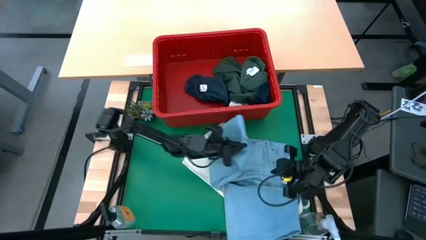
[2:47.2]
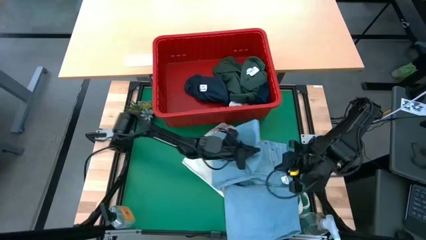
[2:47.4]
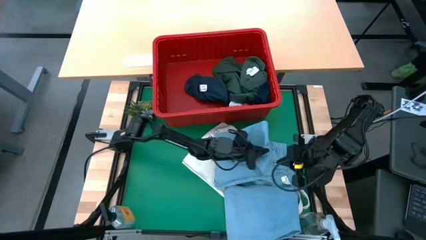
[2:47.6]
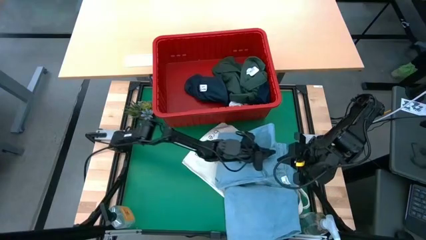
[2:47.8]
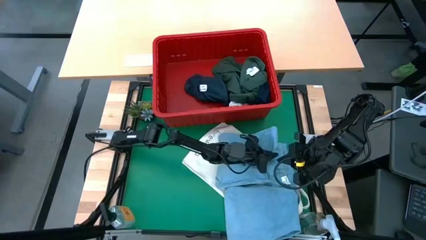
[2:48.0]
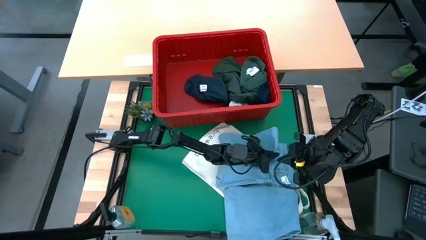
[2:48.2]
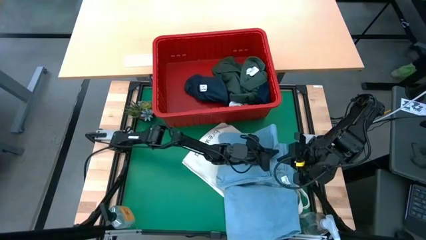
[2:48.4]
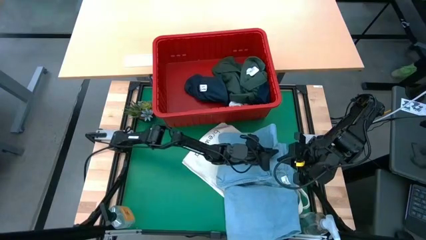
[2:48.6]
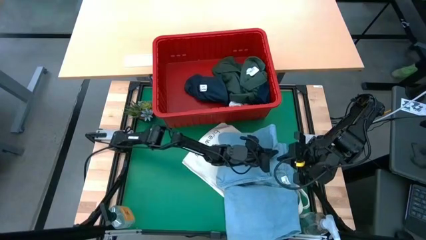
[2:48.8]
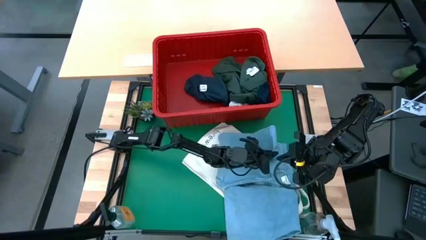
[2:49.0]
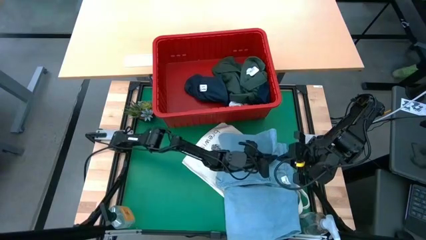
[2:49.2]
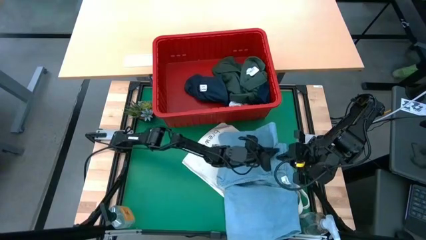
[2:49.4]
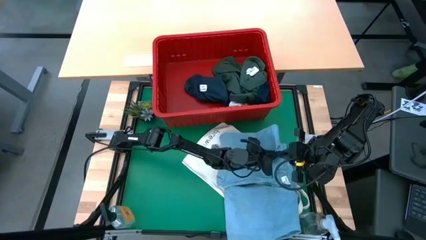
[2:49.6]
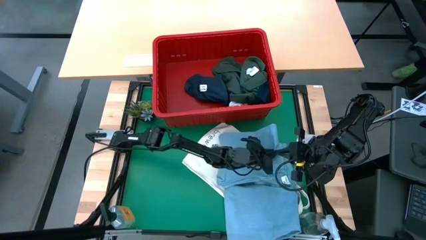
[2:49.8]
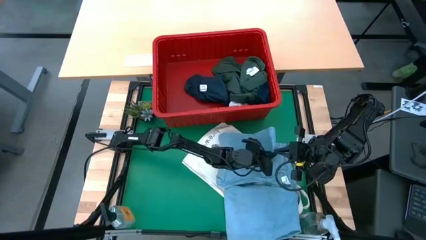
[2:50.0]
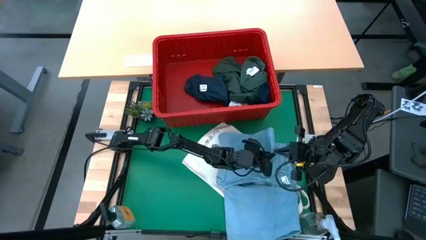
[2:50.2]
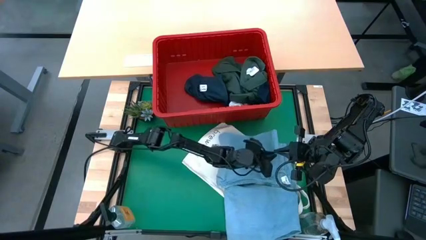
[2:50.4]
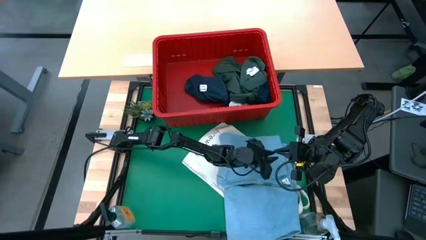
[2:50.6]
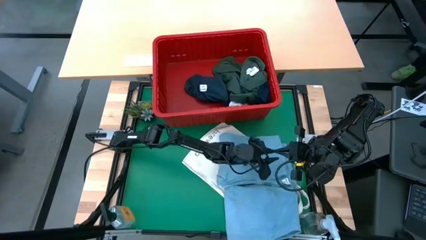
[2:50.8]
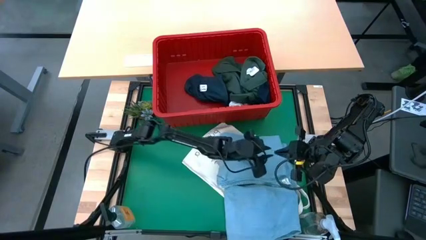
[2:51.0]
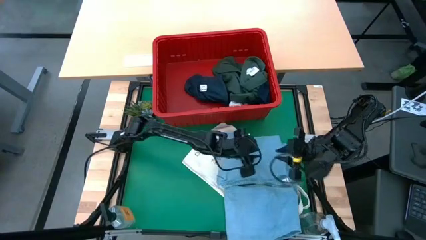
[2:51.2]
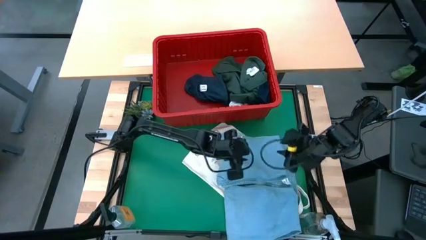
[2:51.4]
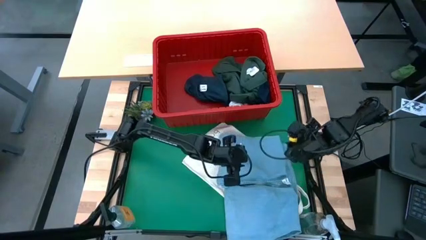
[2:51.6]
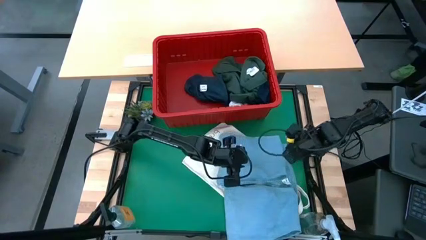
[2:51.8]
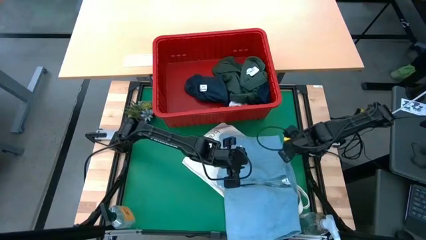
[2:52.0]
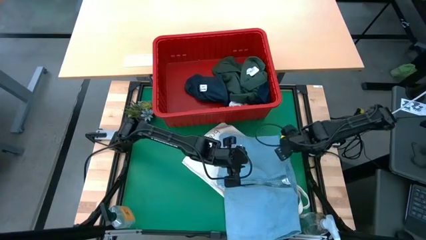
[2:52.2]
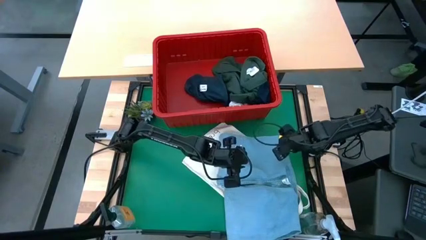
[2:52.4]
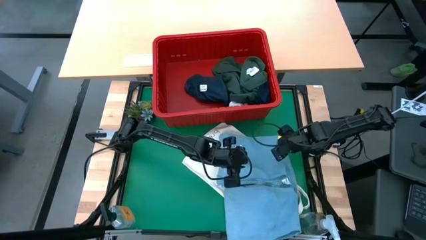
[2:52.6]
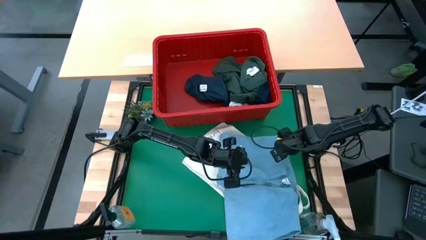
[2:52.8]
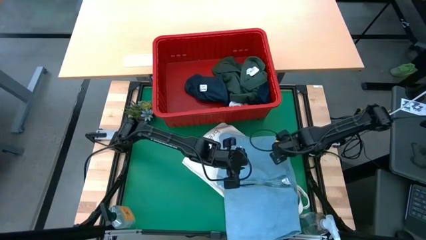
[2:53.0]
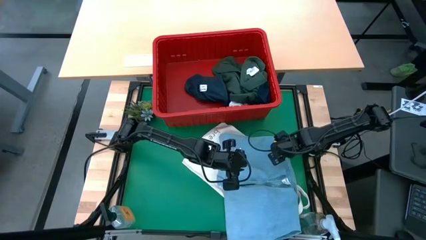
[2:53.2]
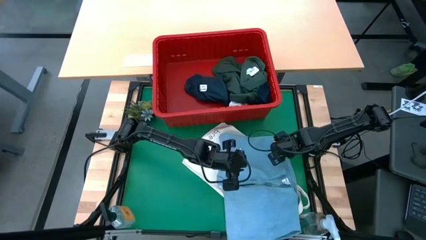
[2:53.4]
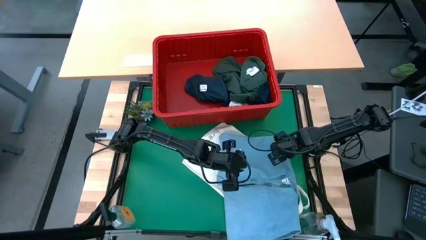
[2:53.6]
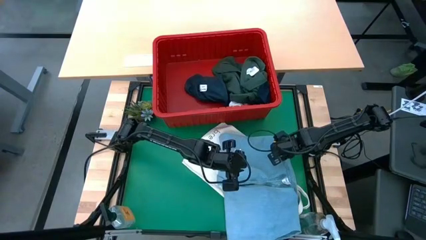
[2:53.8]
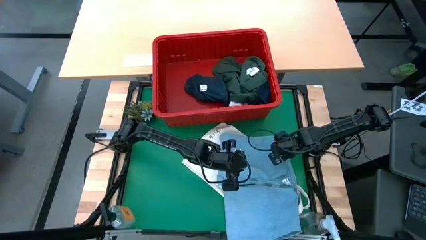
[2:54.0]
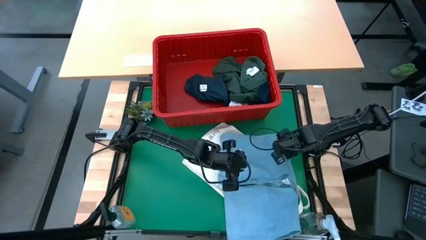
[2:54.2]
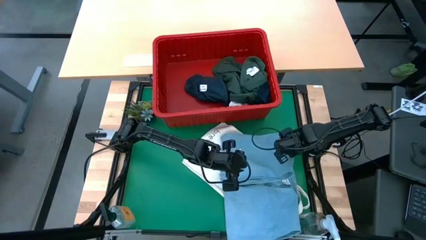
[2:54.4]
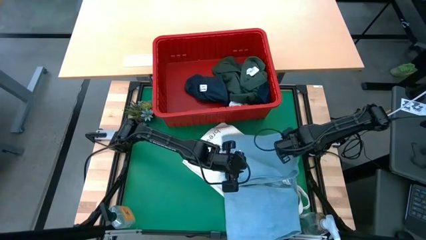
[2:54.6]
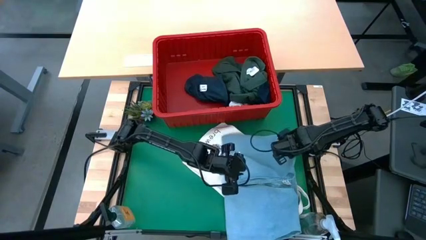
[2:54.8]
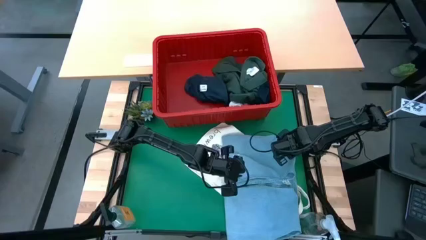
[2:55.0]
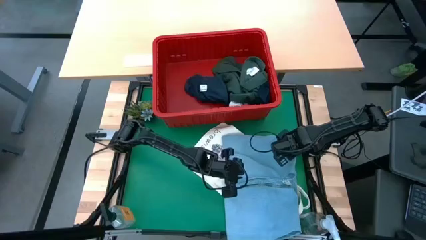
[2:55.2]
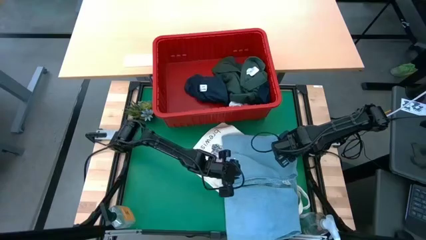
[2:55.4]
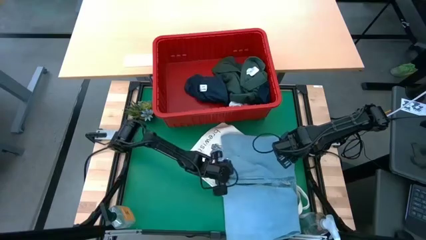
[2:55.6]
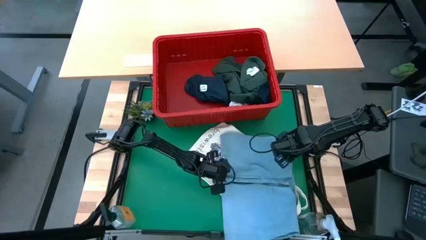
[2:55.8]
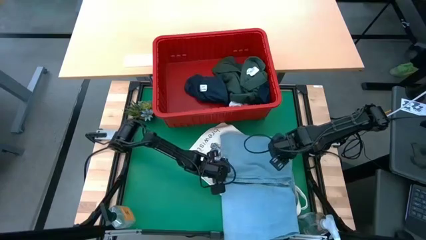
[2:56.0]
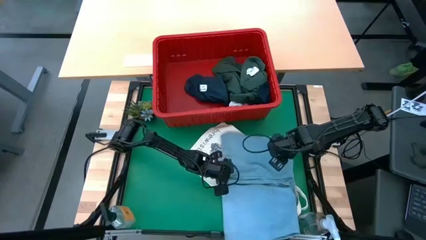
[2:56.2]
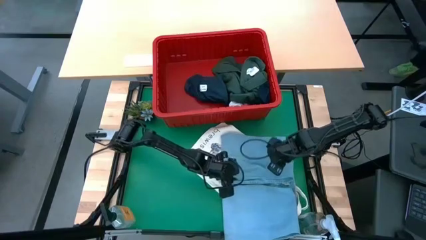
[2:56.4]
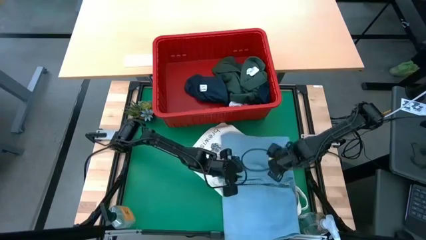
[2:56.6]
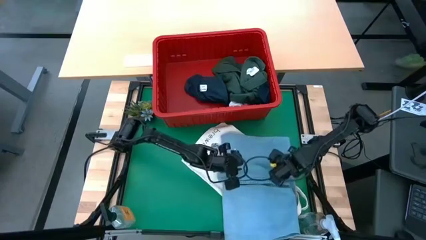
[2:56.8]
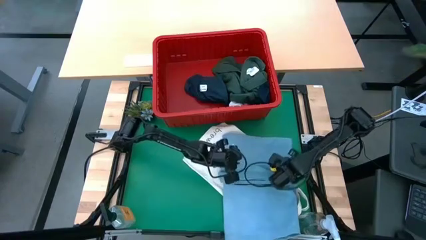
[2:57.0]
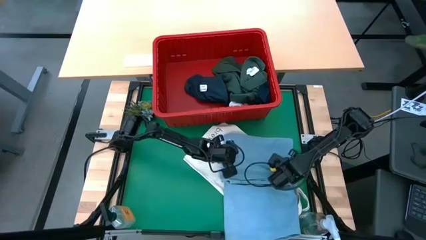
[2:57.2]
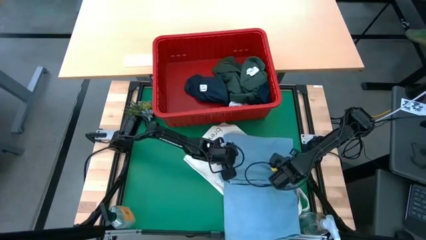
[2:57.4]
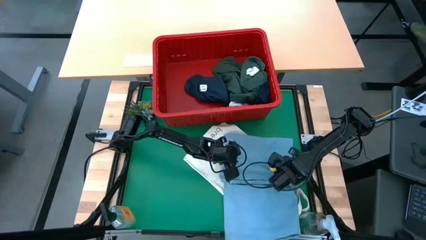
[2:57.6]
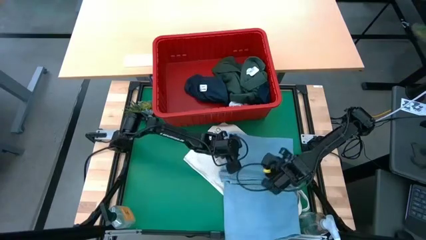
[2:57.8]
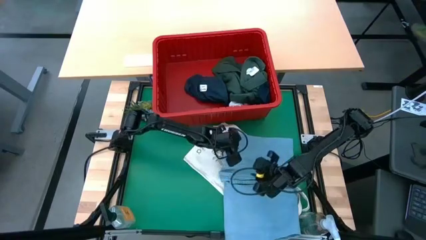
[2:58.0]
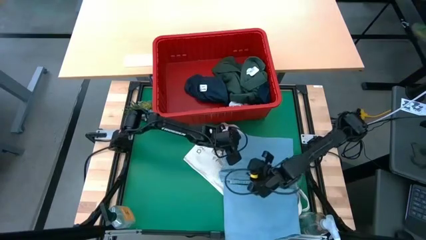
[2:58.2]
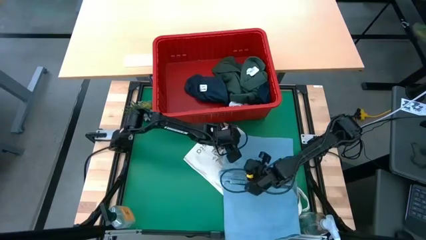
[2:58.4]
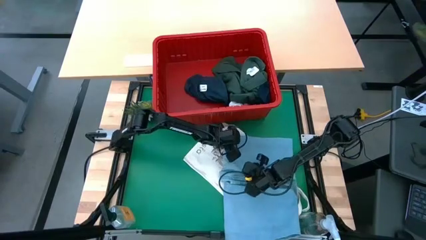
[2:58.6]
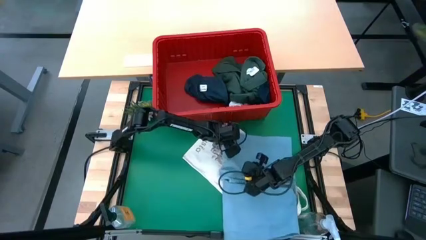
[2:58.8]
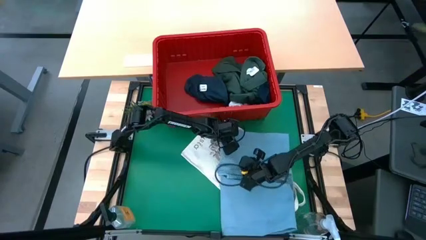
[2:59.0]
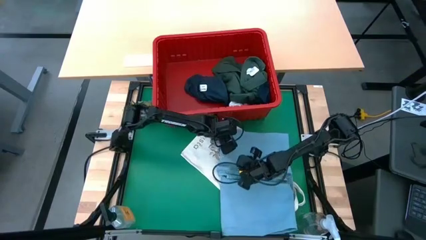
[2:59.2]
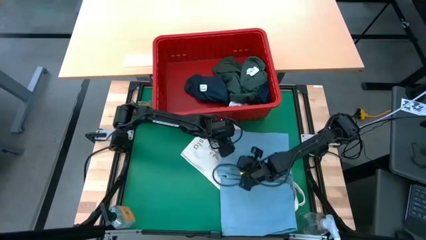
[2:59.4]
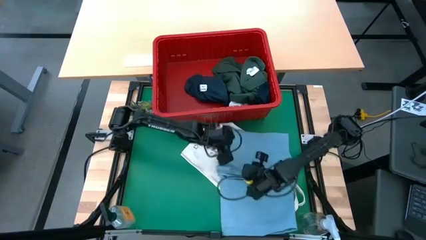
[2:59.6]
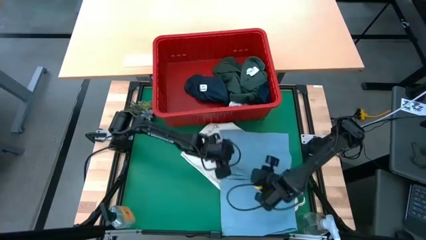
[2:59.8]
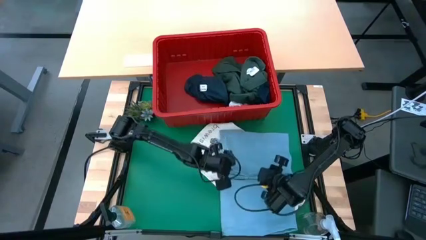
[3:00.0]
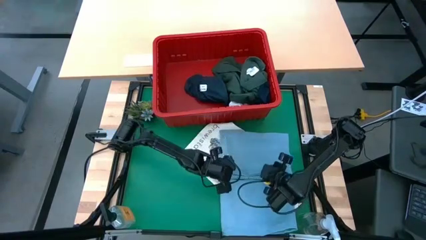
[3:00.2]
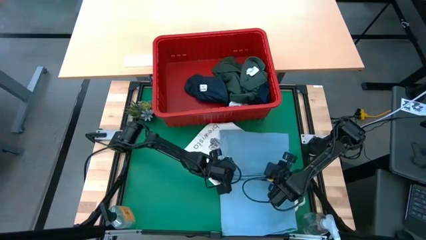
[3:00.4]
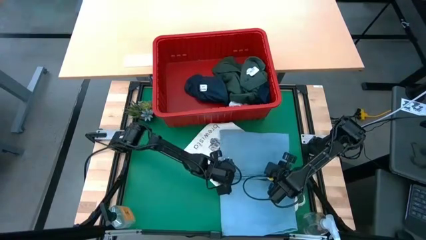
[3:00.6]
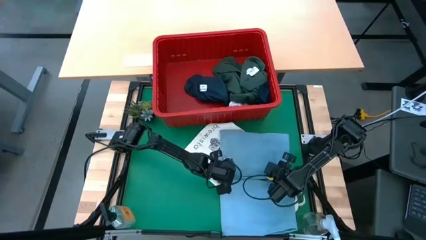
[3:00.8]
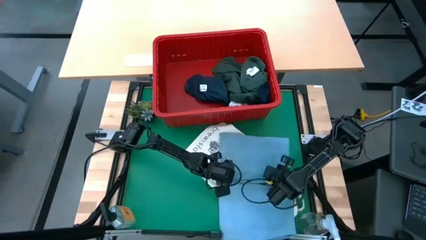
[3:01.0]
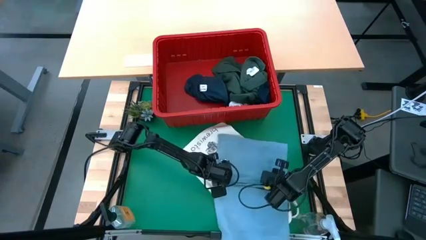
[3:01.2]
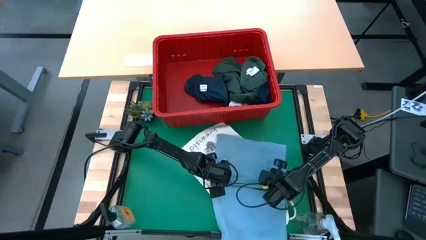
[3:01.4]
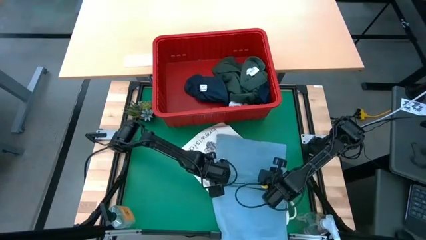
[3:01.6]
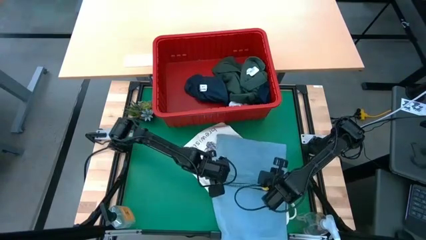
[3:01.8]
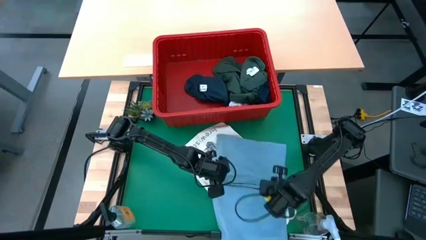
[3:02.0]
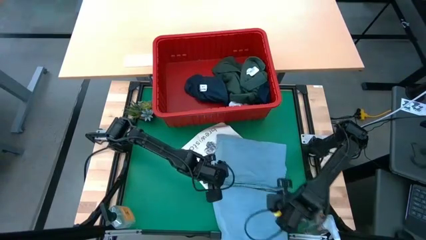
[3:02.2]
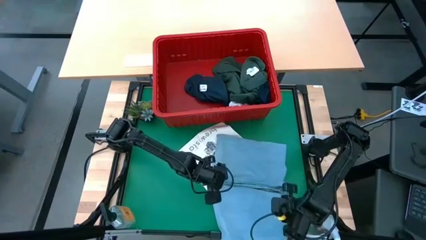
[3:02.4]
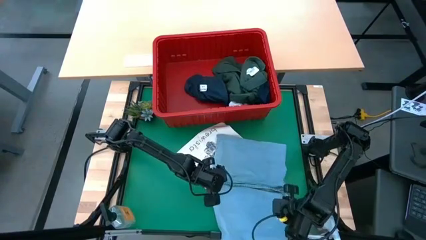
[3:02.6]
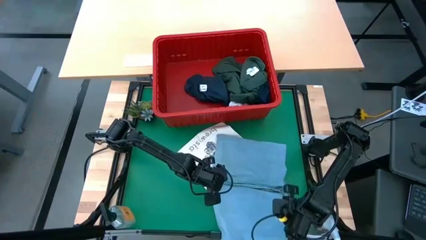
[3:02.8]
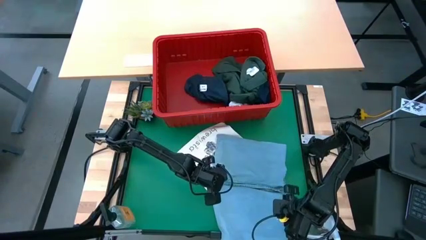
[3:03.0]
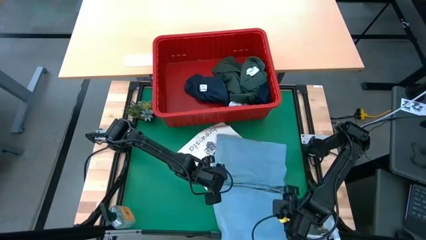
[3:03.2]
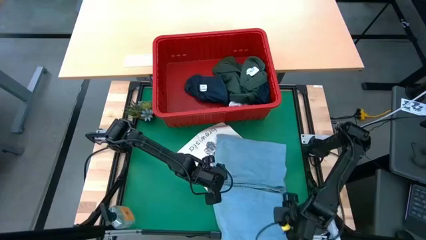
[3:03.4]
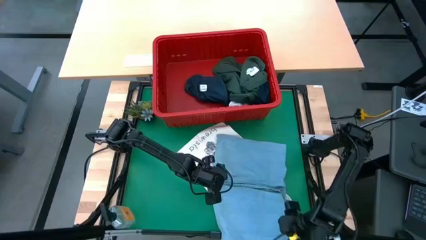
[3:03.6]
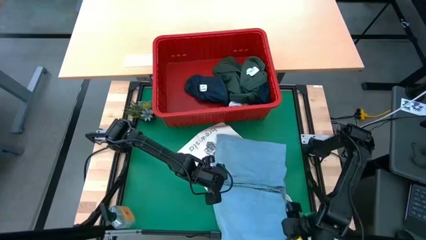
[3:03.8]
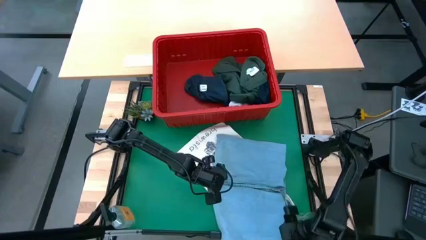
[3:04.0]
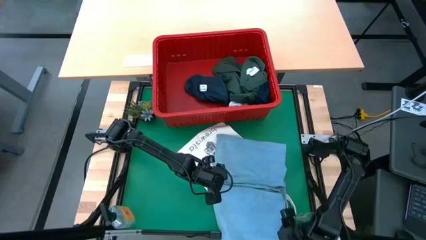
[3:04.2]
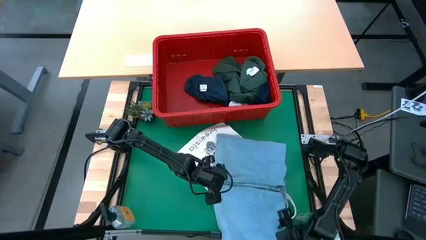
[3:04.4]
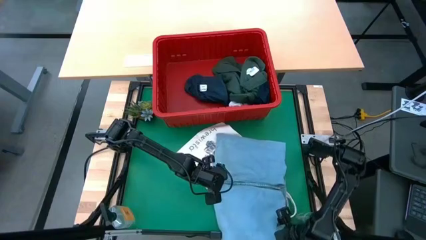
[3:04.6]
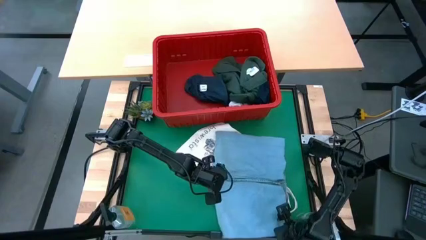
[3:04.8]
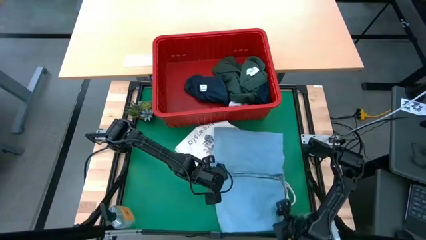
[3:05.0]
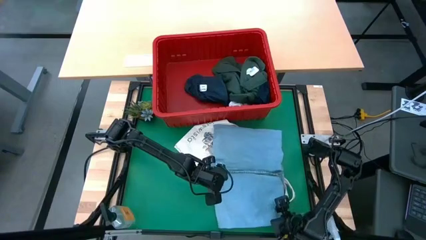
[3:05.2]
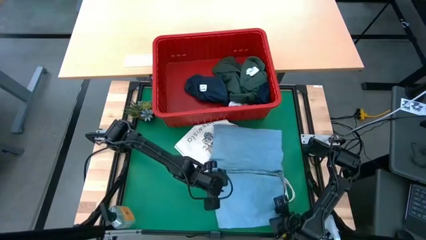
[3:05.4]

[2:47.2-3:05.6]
Task: Fold laundry
Fold the light blue pants
